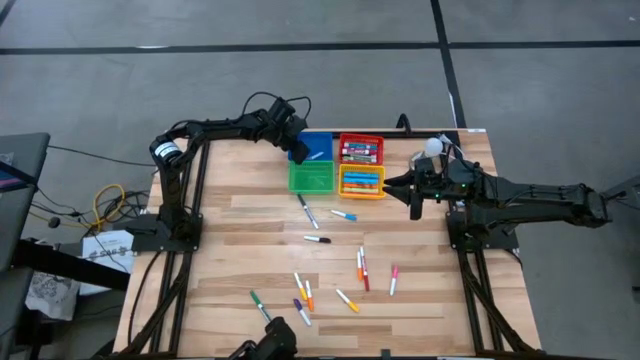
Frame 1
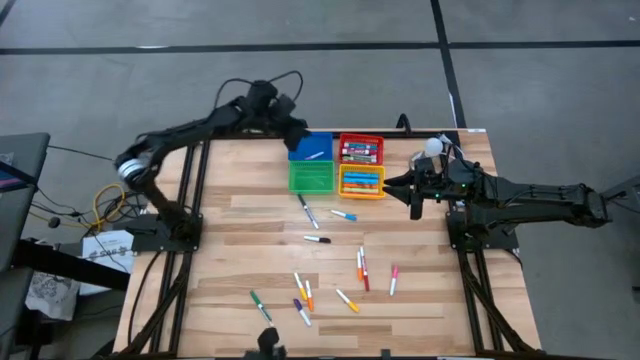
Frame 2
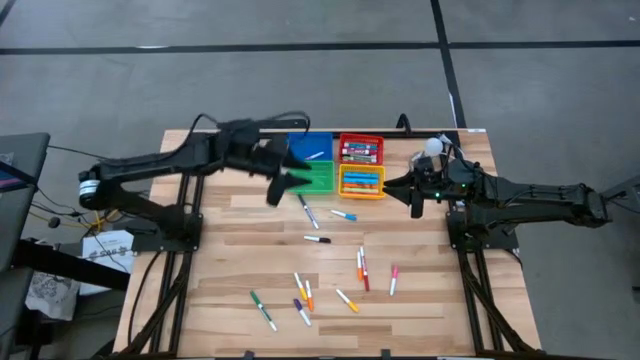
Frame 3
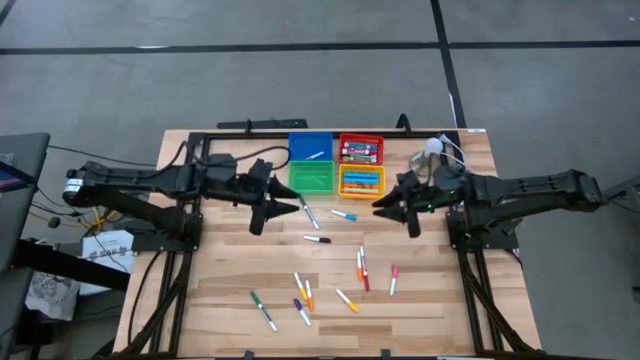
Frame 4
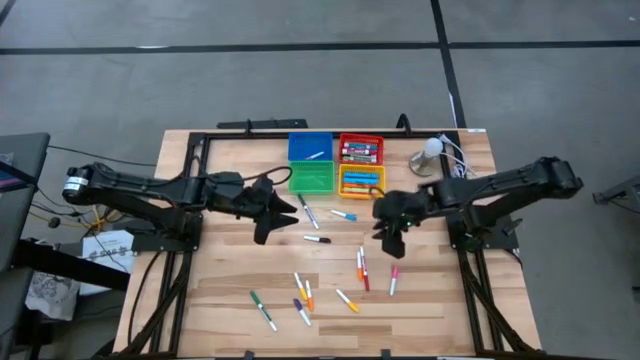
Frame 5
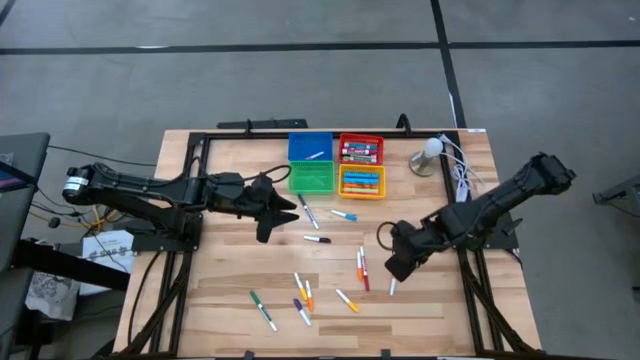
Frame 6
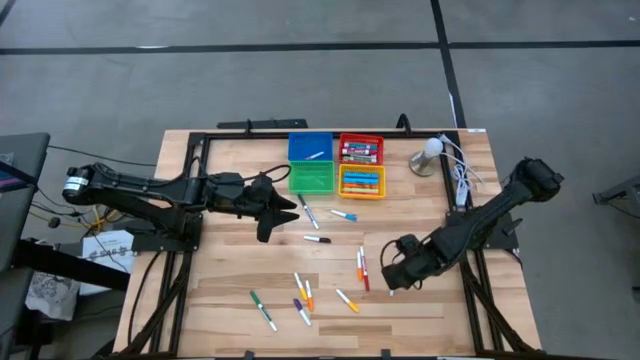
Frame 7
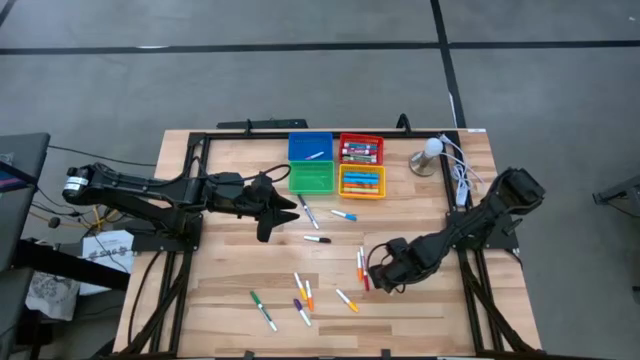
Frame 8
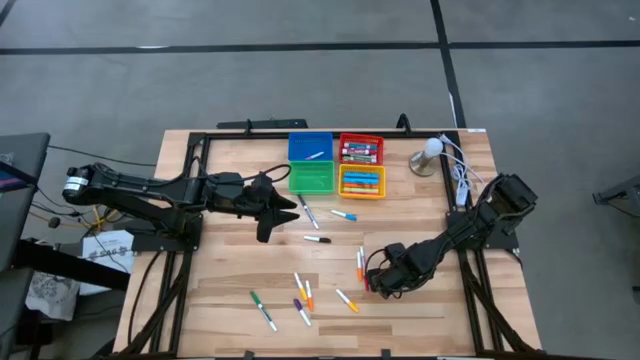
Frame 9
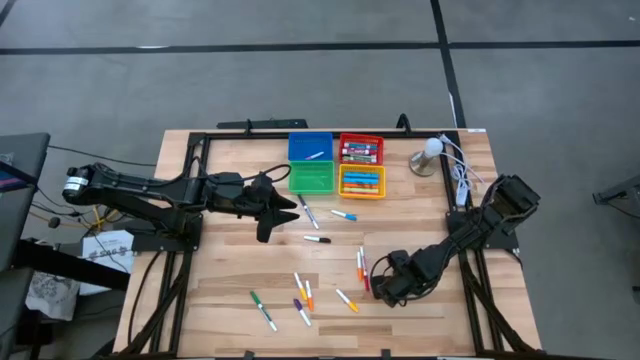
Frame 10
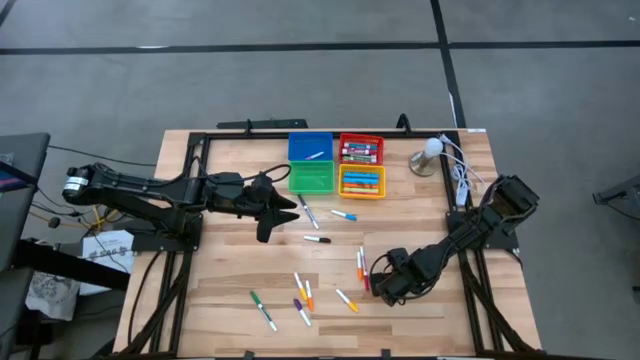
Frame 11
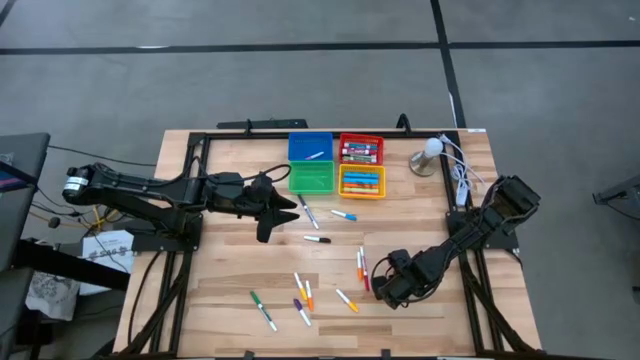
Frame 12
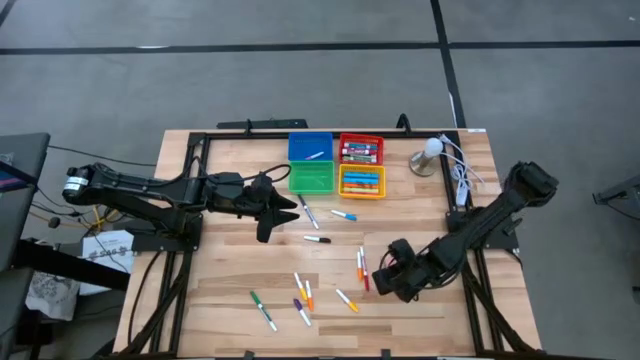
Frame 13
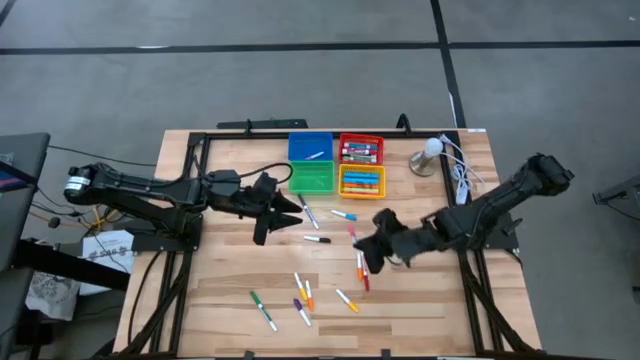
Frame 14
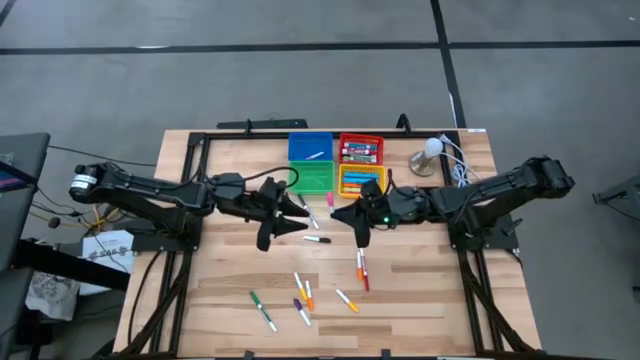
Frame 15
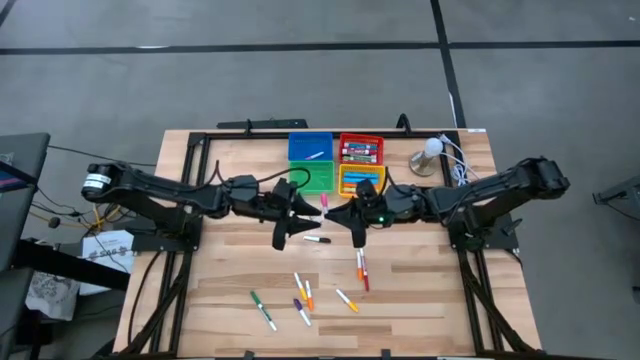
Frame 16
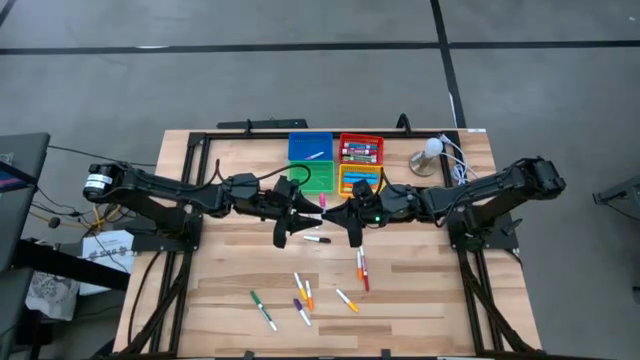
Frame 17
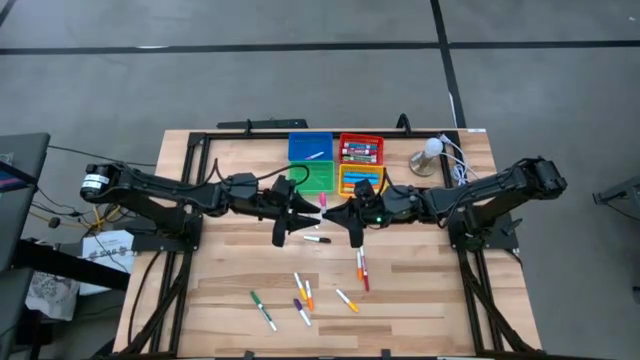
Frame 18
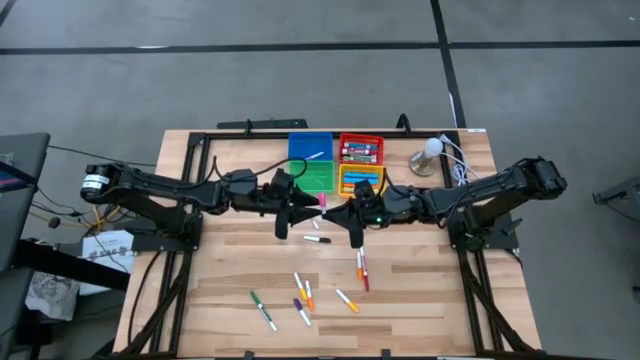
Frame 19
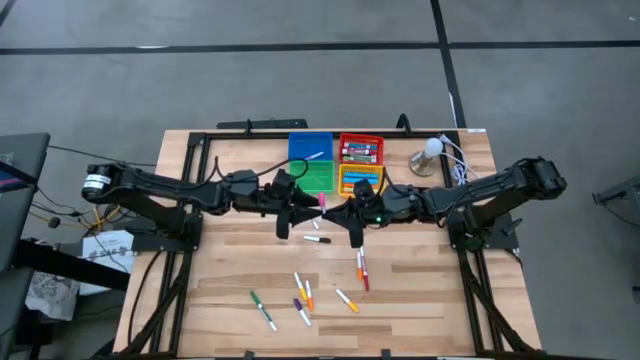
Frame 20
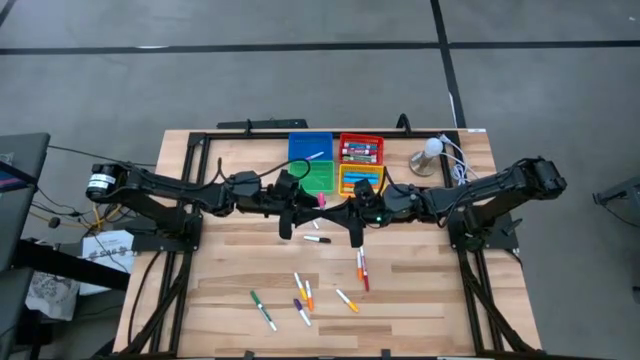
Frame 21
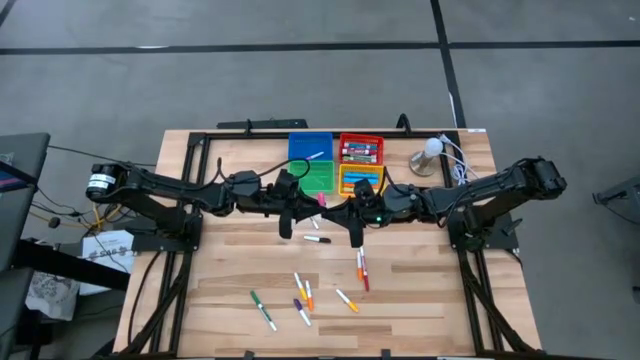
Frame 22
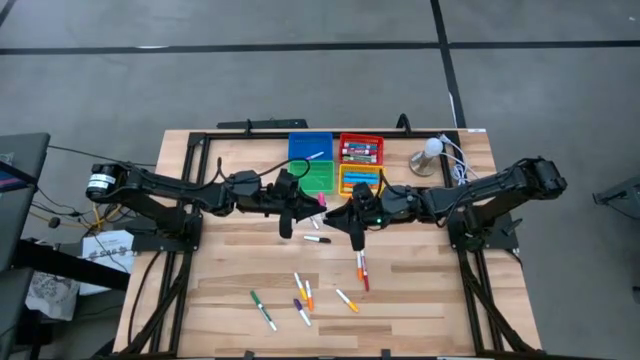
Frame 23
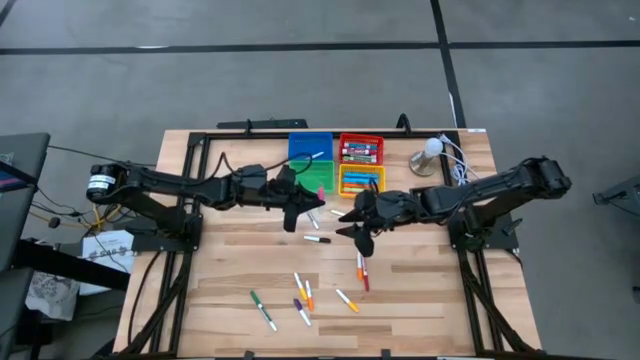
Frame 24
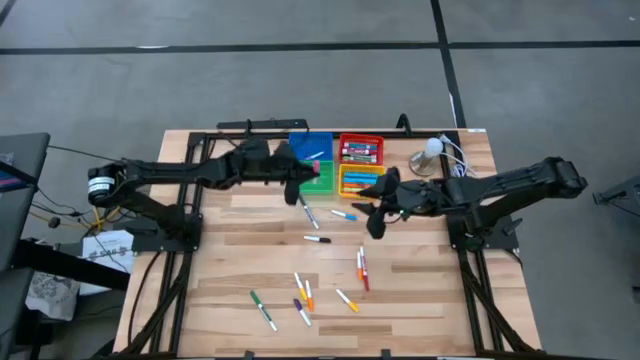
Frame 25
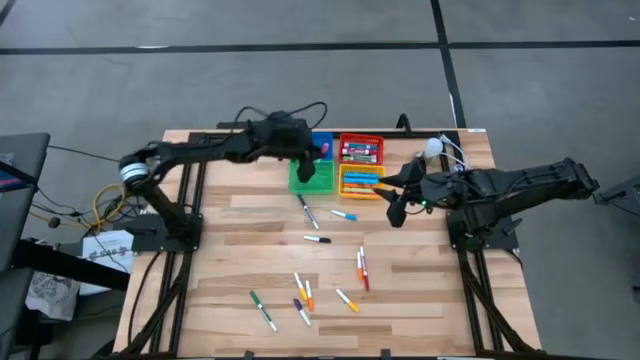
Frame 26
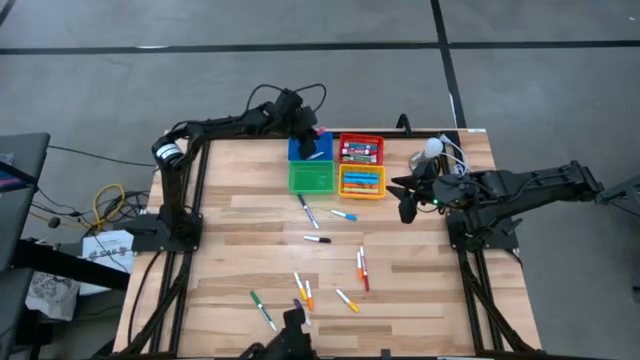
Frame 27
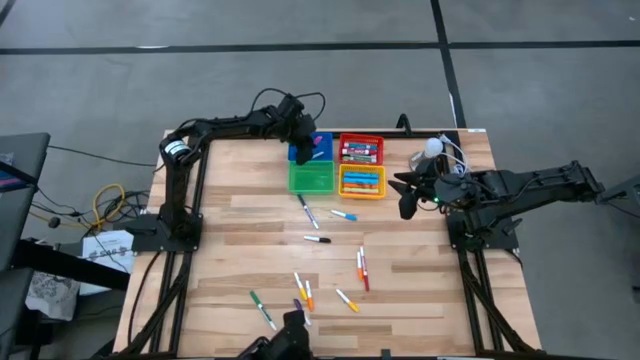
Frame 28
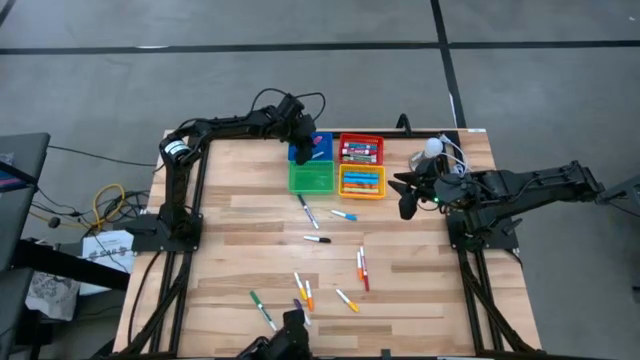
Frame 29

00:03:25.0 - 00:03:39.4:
Task: Pick & Place Markers
Put the small pink highlighter pen into the blue bin

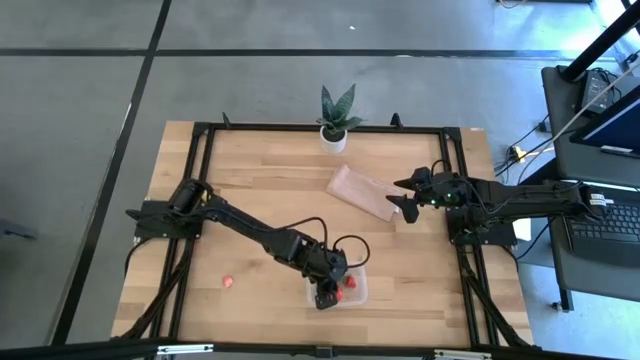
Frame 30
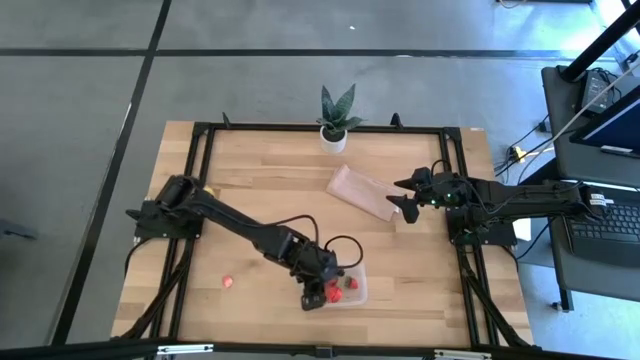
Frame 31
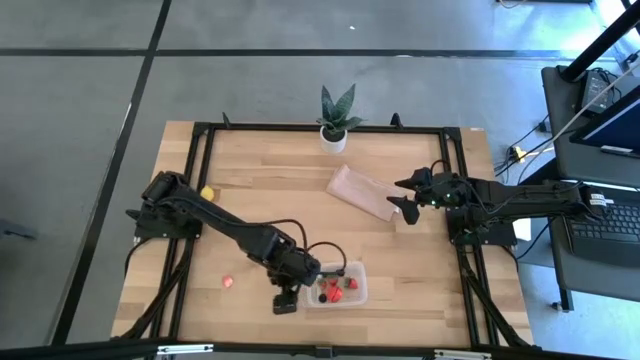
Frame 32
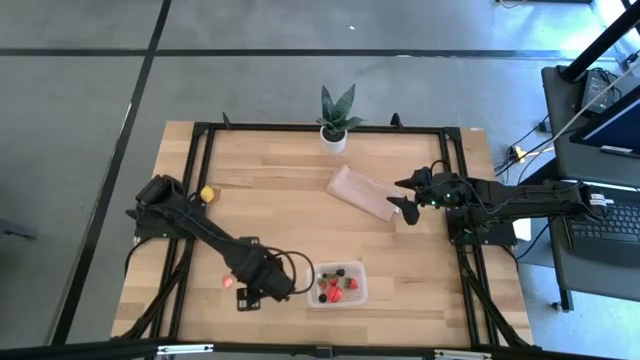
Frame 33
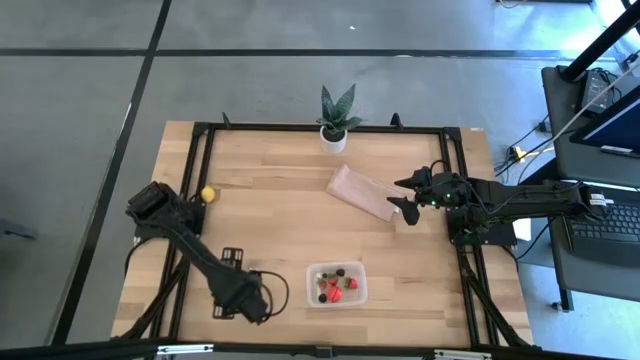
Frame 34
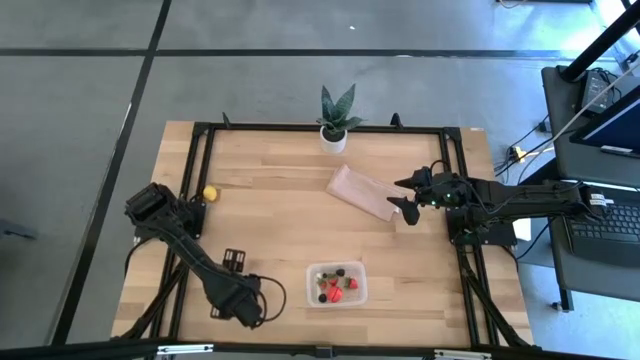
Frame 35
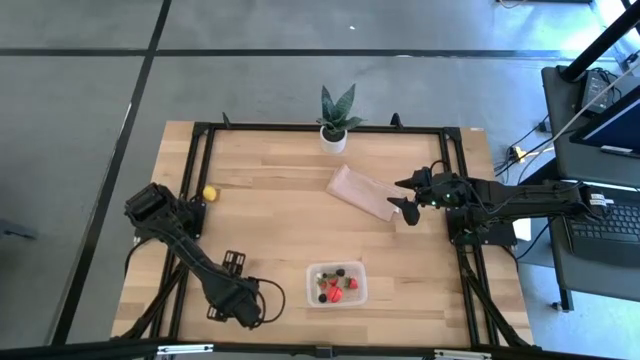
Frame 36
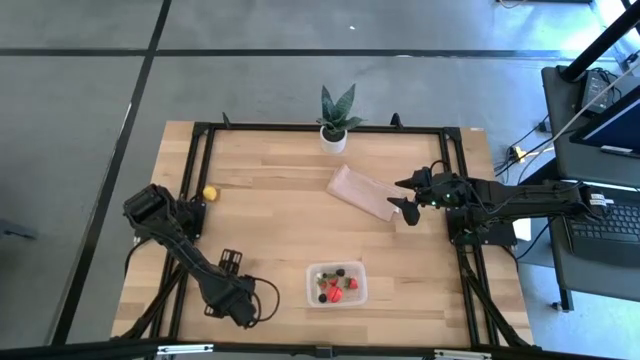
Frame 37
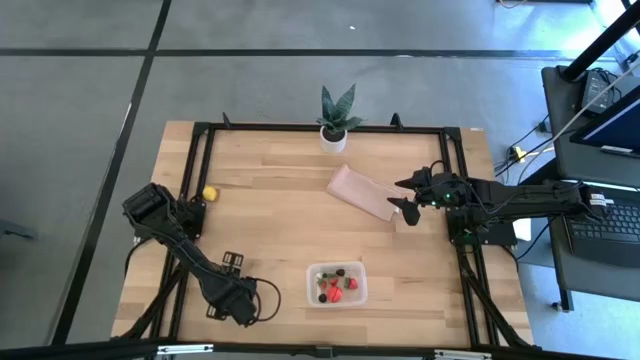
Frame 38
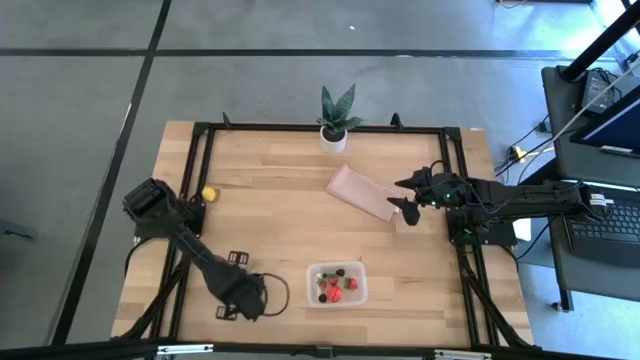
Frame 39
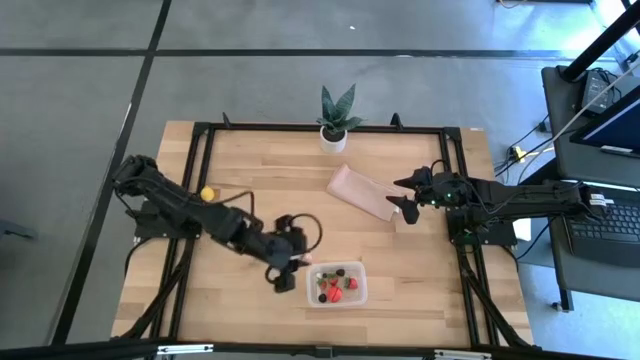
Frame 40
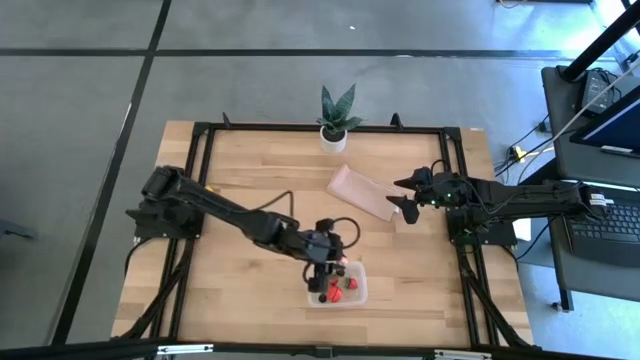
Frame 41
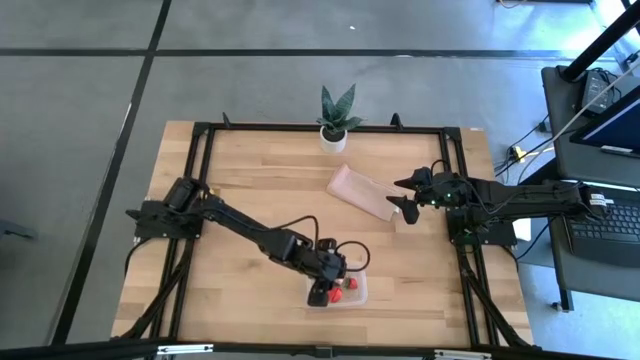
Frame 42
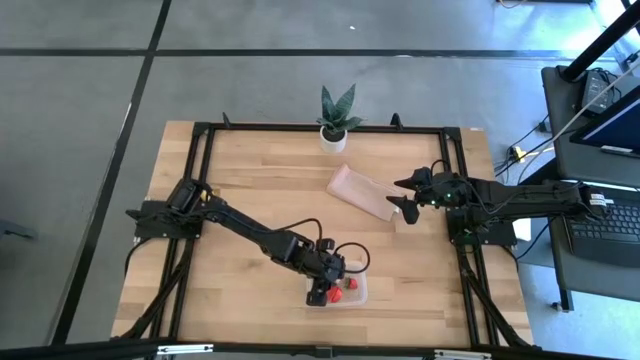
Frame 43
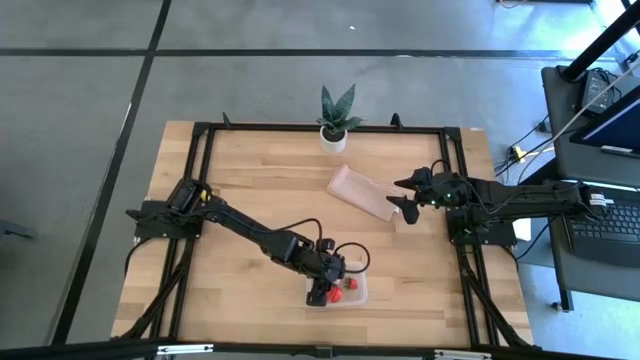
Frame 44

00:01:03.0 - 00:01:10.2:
Task: Pick and placing Produce into tupperware
Put the pink peach in the bin
